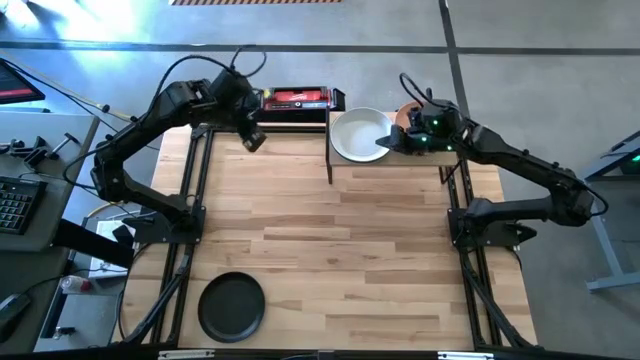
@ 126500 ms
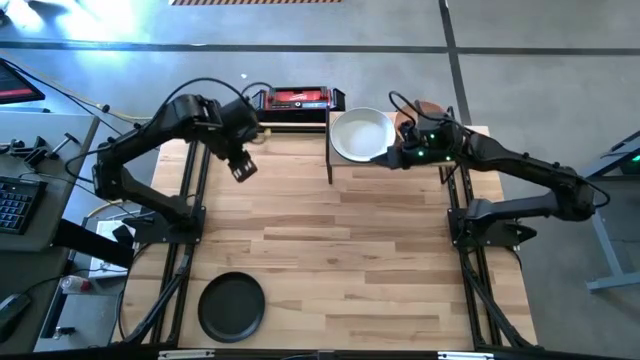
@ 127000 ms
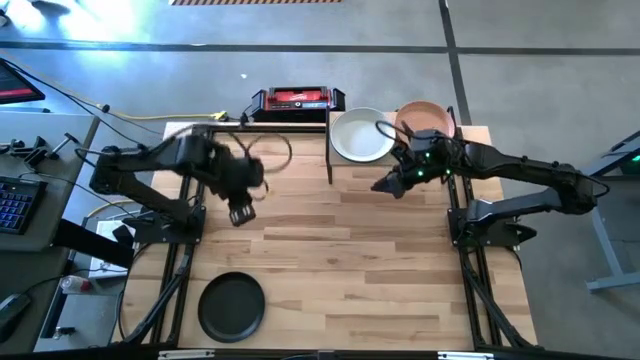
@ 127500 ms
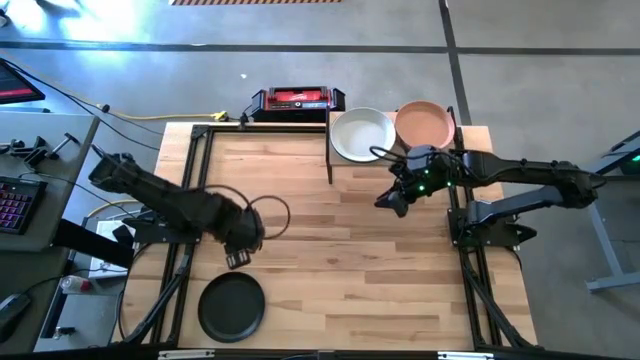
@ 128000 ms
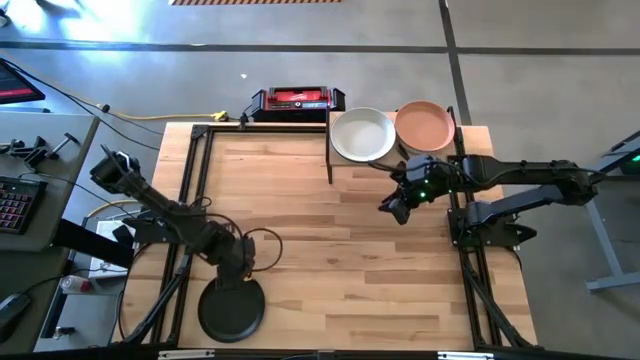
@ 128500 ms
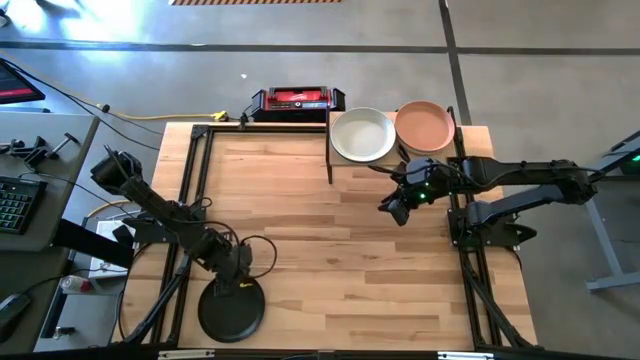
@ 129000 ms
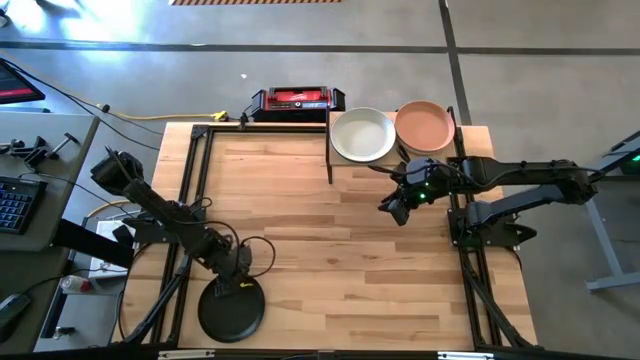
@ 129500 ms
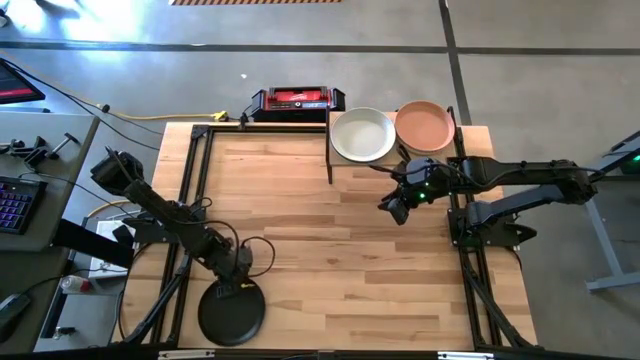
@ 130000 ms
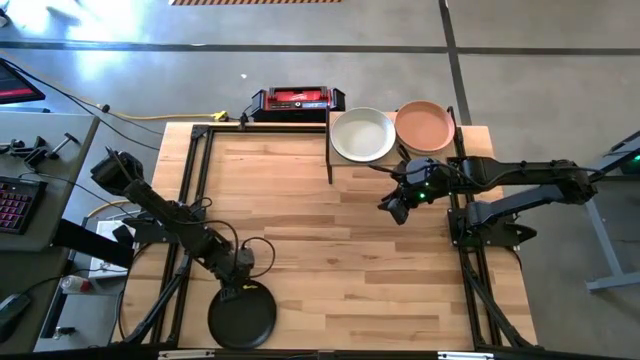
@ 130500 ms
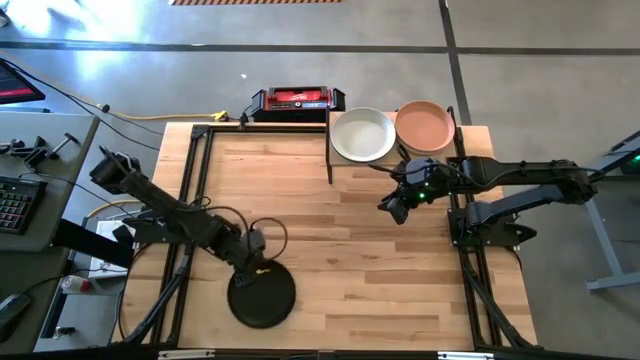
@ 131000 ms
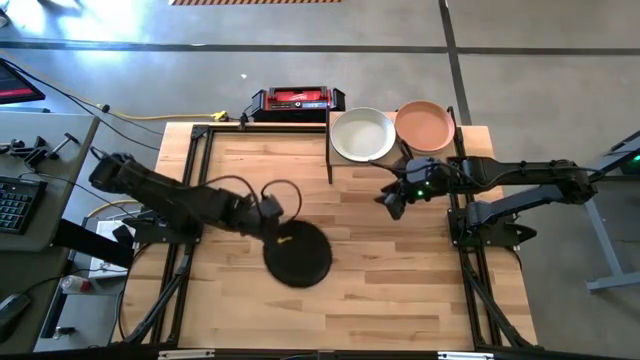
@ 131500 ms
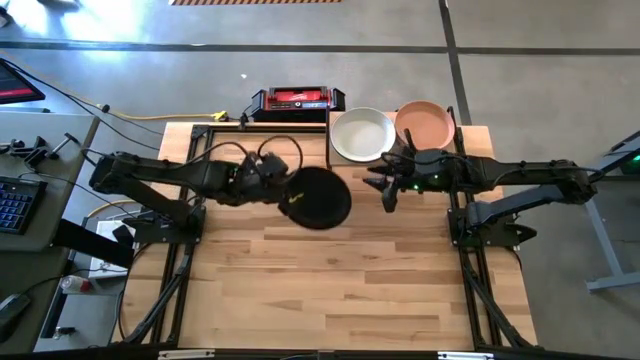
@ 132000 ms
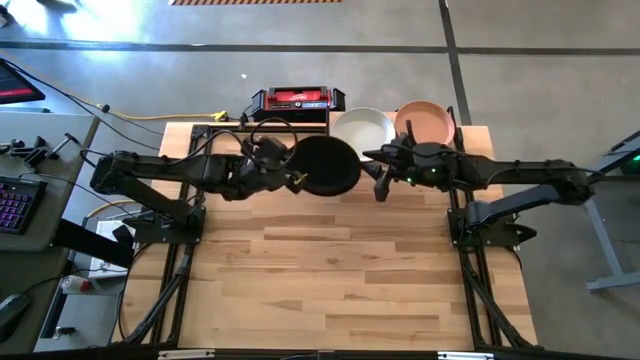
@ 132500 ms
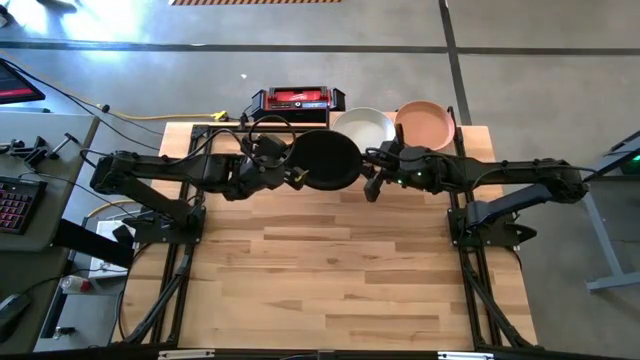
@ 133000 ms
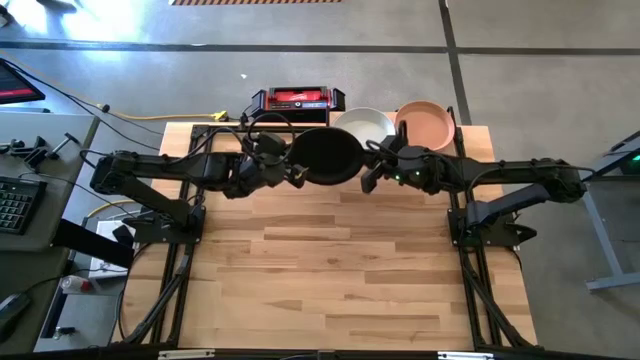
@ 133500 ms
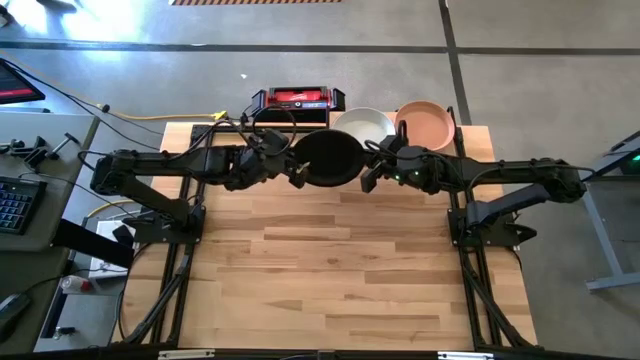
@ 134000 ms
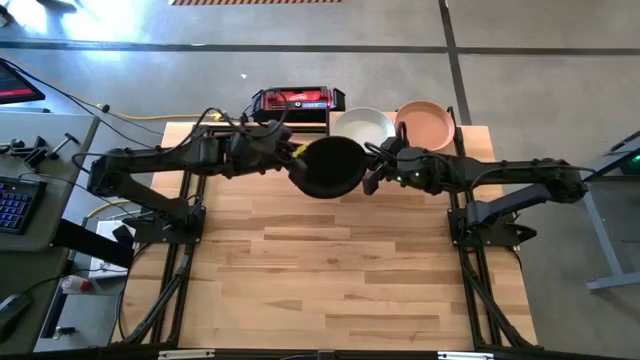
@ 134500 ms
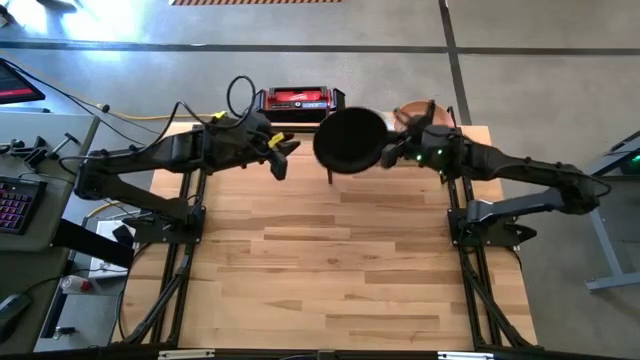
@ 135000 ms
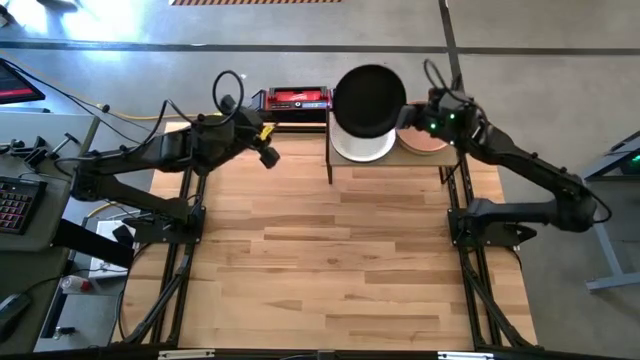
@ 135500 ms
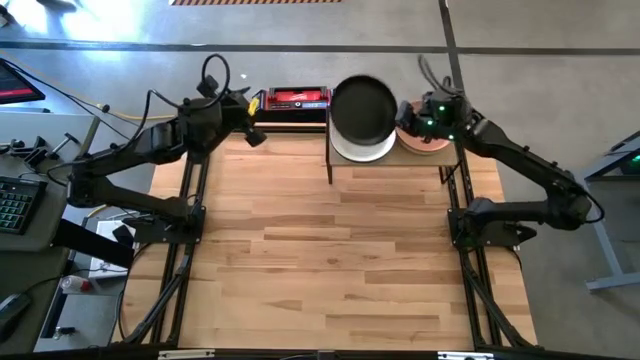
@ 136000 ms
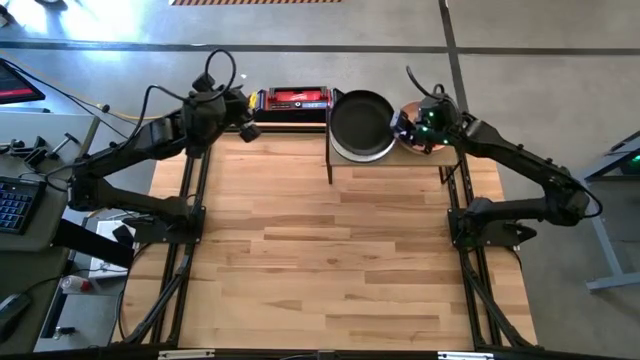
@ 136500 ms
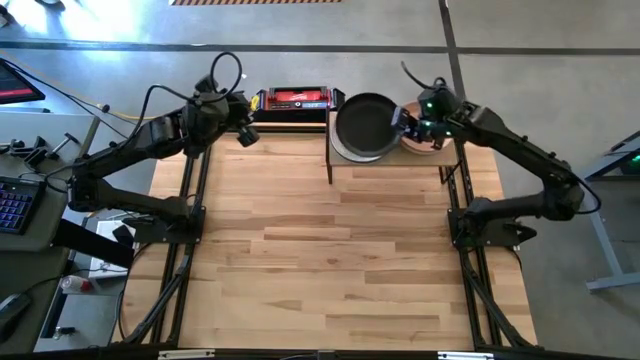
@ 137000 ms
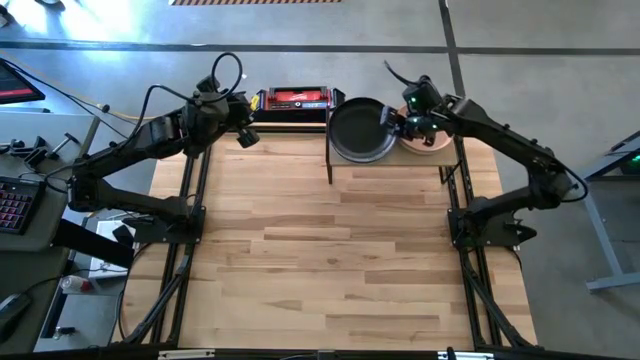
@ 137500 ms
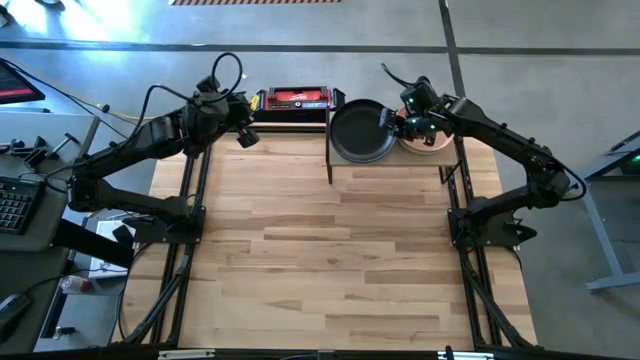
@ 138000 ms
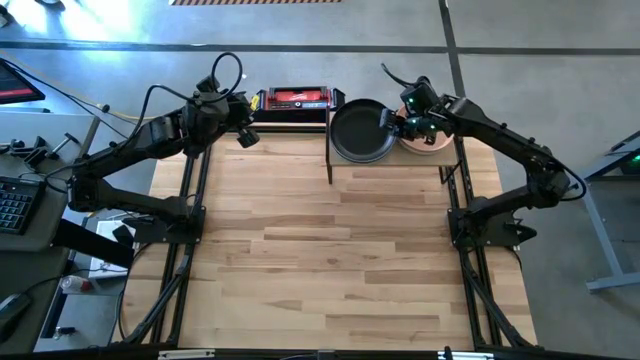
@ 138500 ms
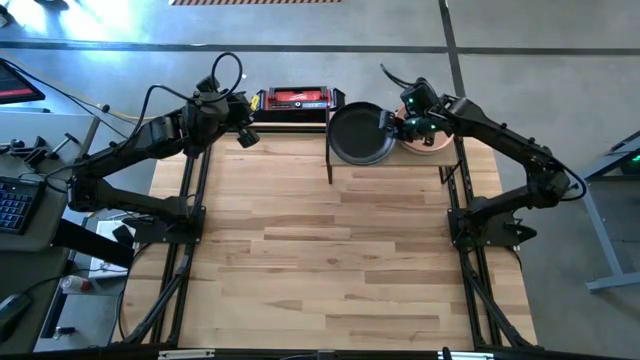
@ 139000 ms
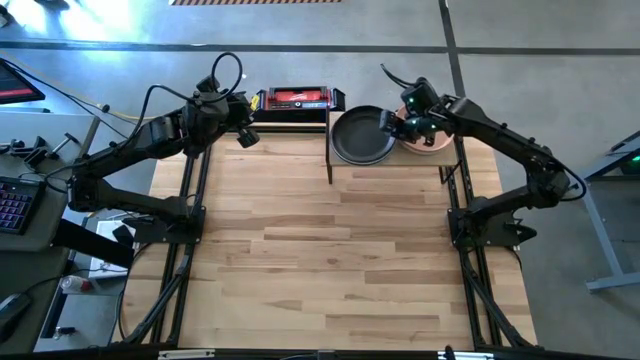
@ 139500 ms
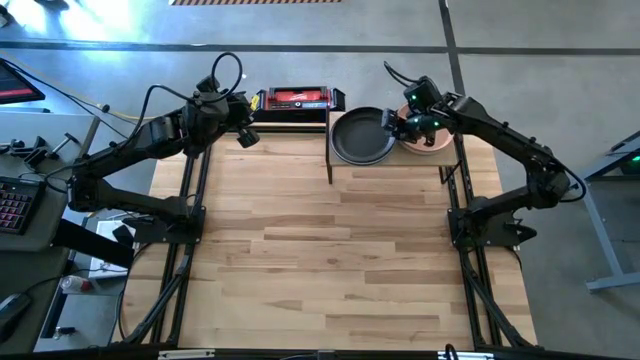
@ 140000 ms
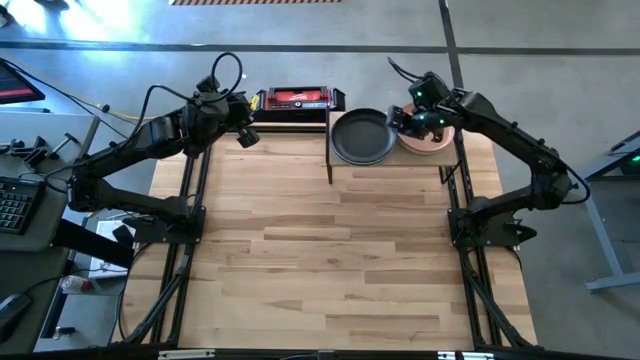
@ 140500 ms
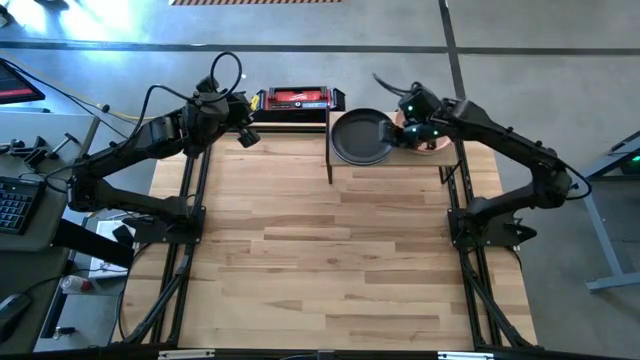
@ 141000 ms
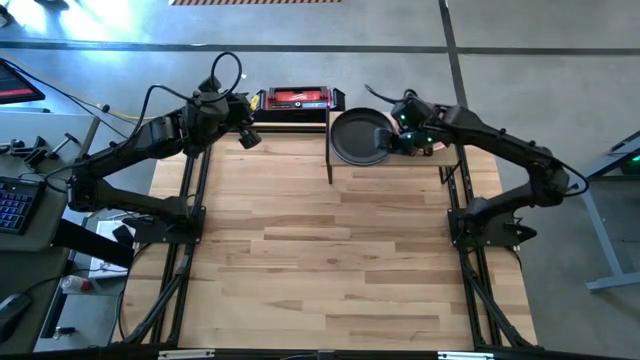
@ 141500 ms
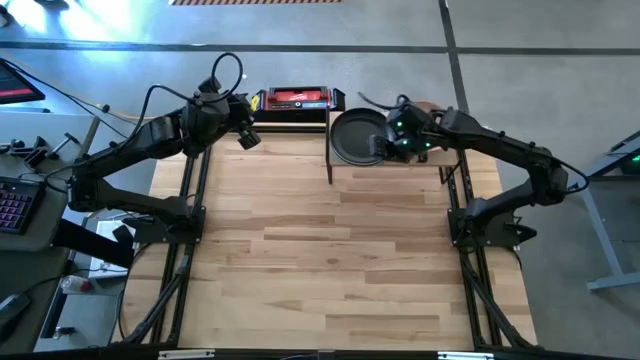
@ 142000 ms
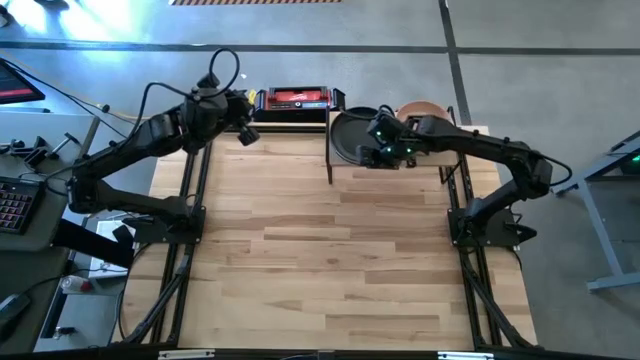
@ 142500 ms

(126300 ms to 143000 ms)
Task: Place and stack plates onto a shelf
Stack the black plate on the white plate

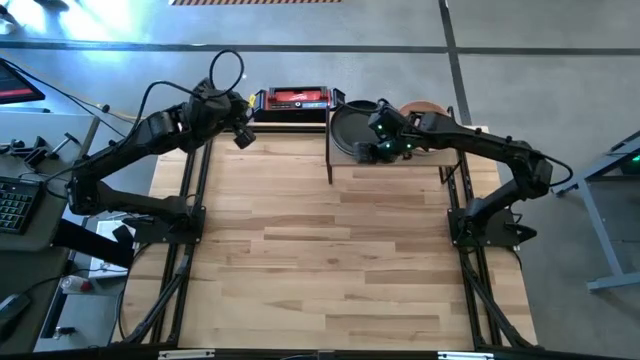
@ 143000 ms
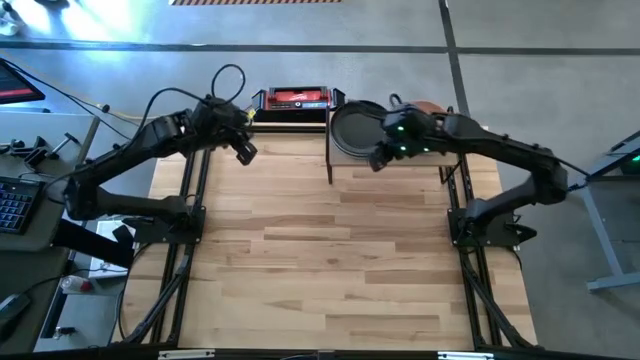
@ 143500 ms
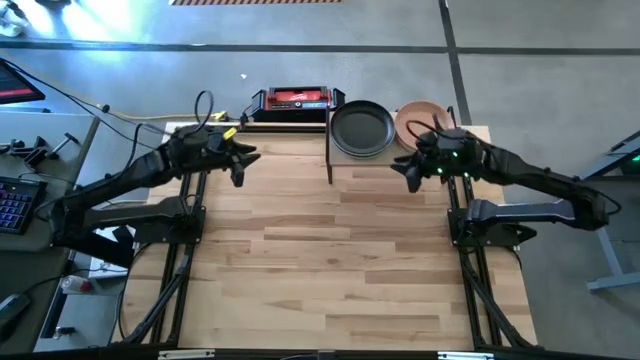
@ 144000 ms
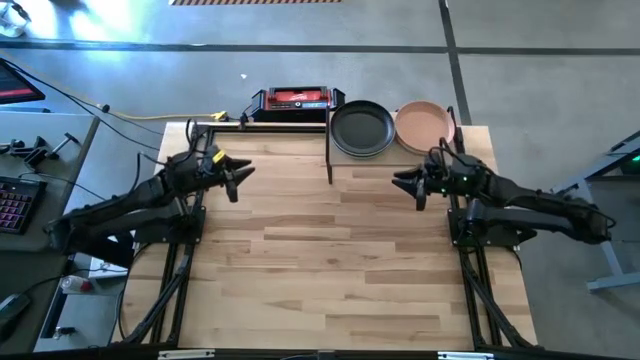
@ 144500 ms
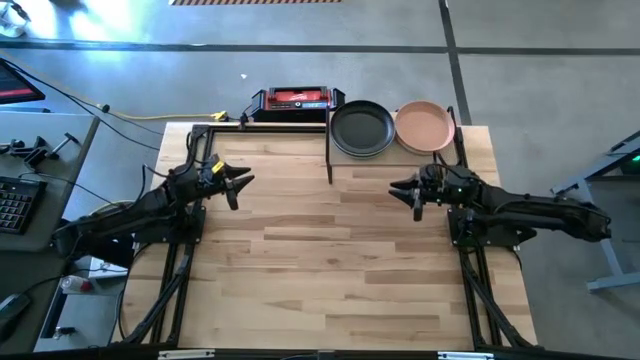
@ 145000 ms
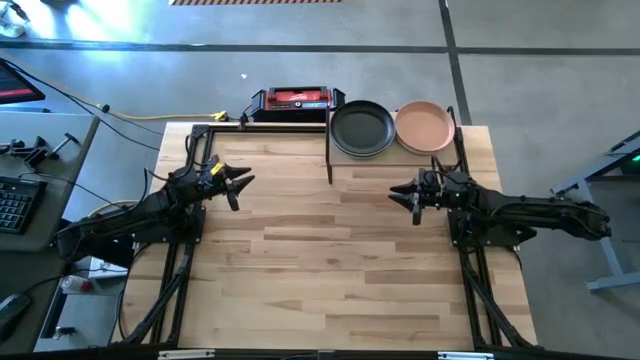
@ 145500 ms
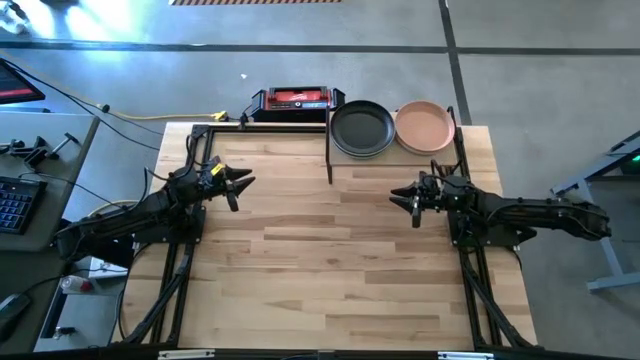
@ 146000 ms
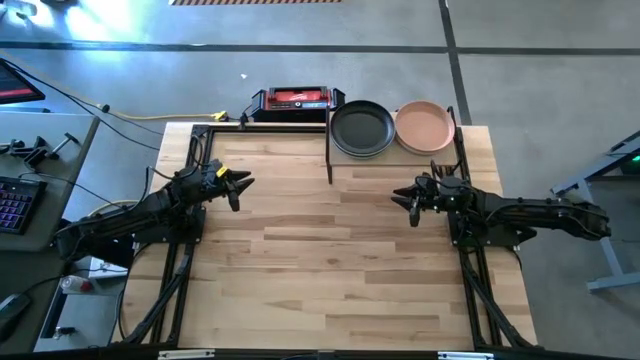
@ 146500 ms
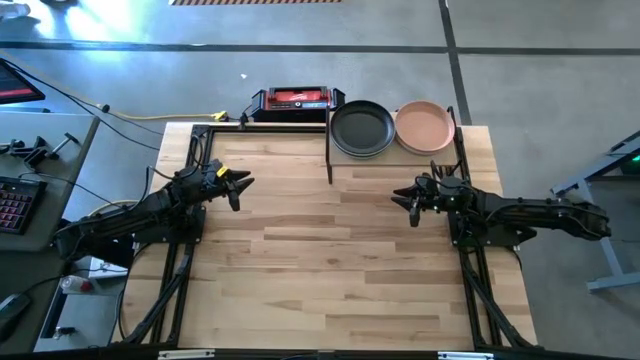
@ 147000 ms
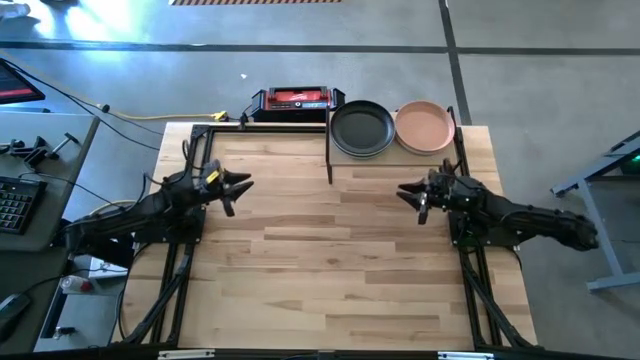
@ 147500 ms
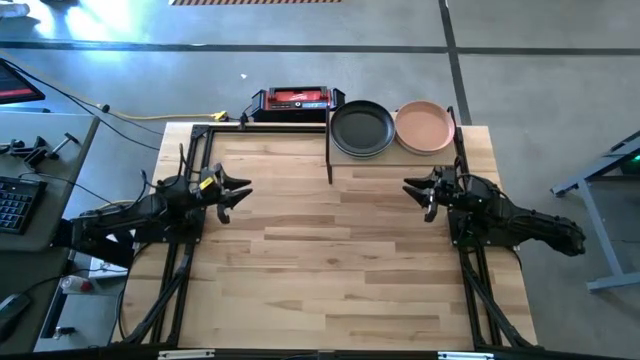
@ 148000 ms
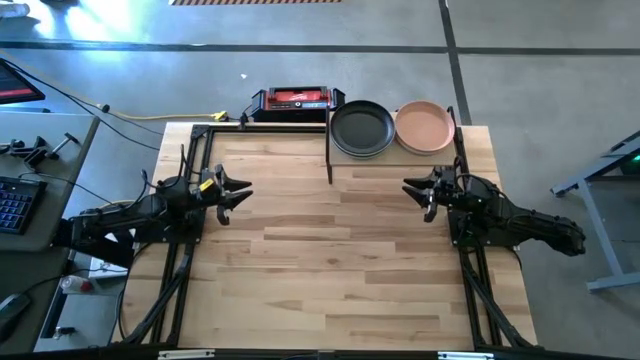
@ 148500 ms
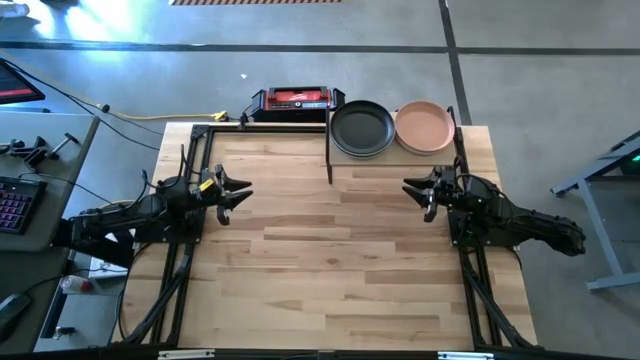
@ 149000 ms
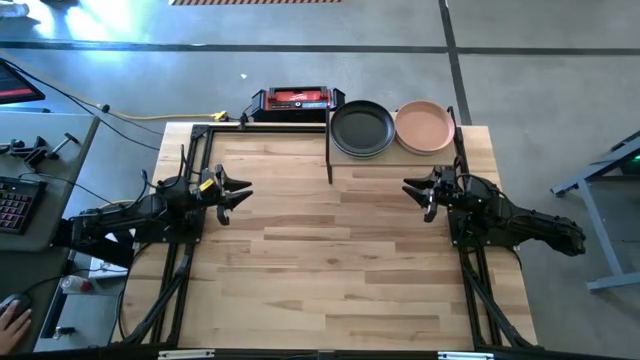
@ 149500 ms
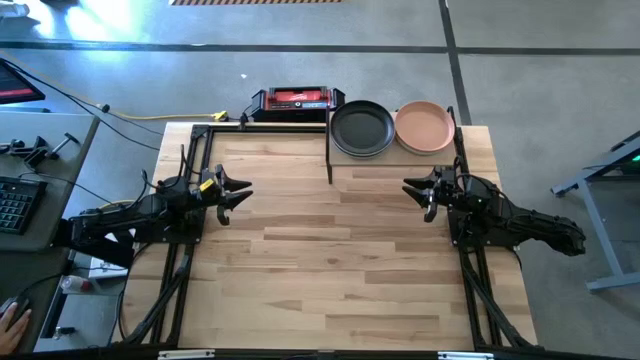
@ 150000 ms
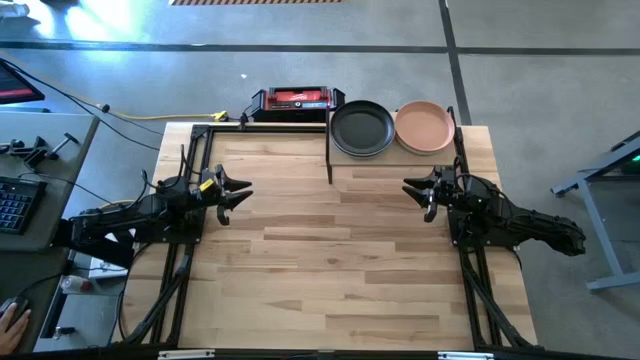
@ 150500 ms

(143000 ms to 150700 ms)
Return to Home Position
